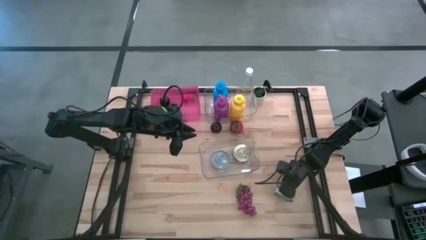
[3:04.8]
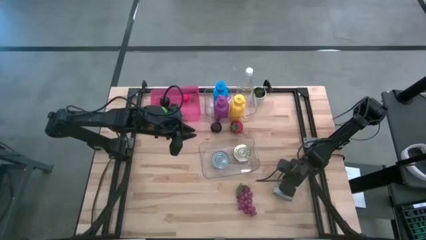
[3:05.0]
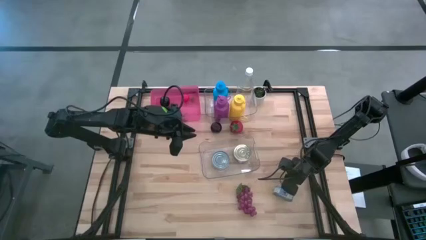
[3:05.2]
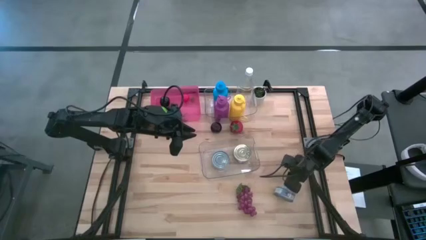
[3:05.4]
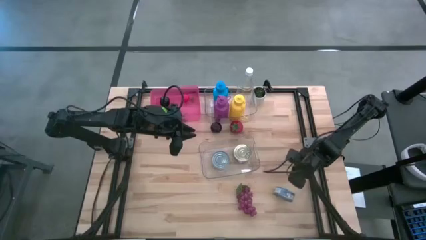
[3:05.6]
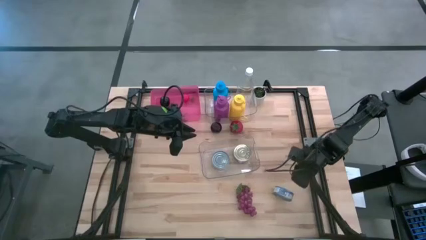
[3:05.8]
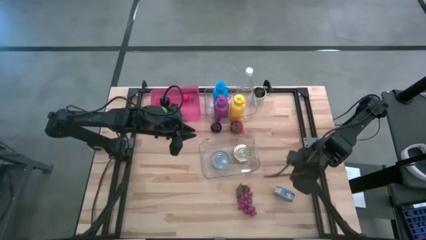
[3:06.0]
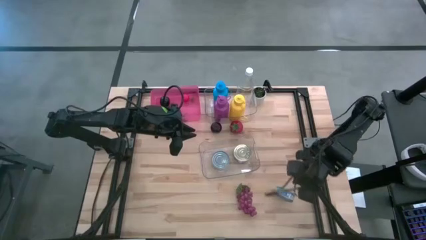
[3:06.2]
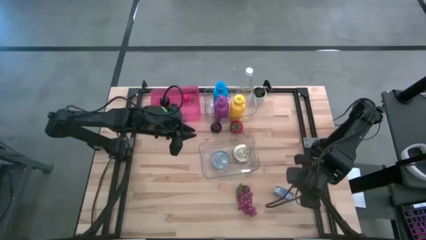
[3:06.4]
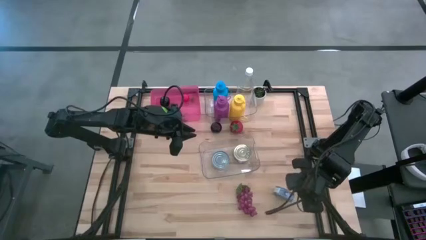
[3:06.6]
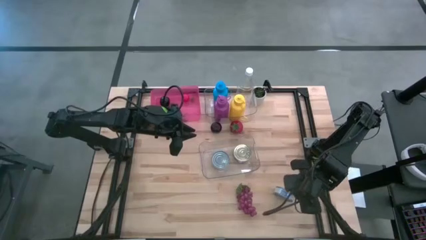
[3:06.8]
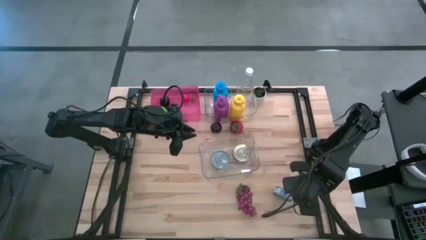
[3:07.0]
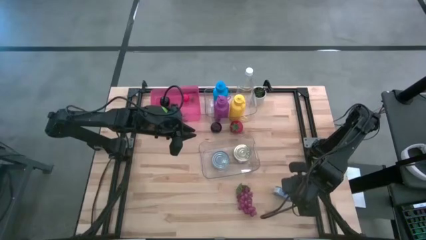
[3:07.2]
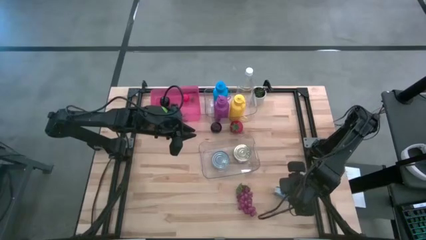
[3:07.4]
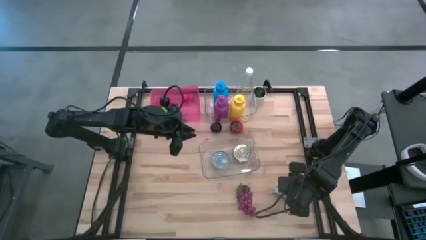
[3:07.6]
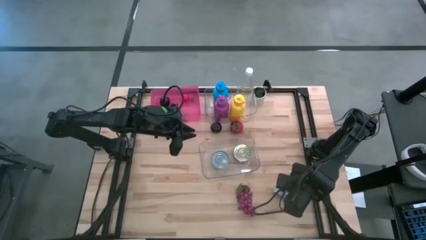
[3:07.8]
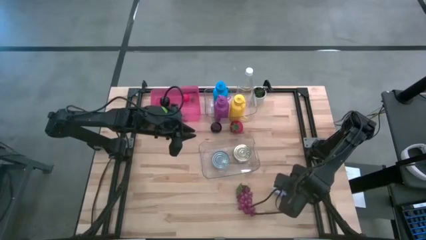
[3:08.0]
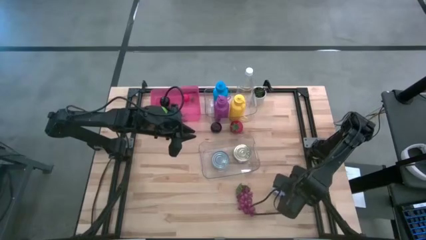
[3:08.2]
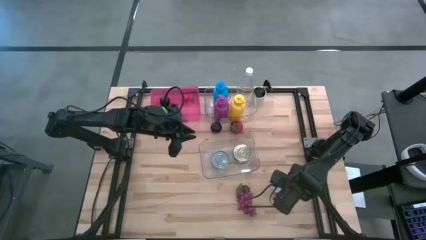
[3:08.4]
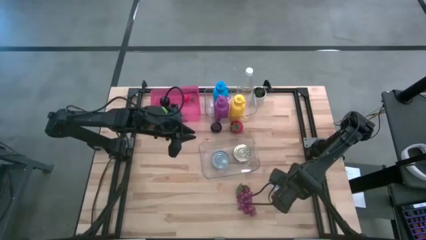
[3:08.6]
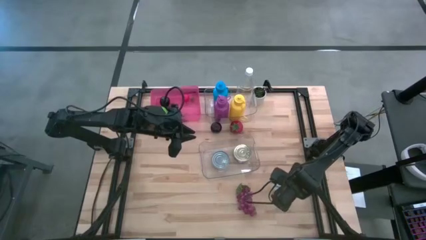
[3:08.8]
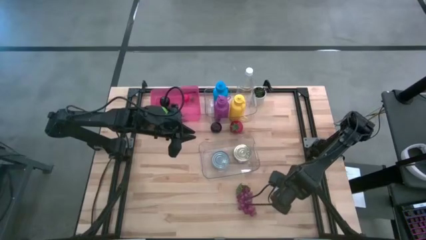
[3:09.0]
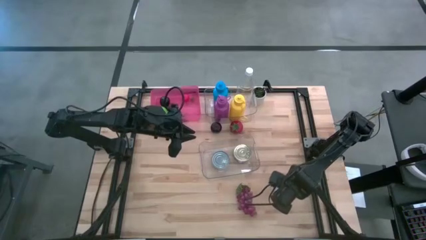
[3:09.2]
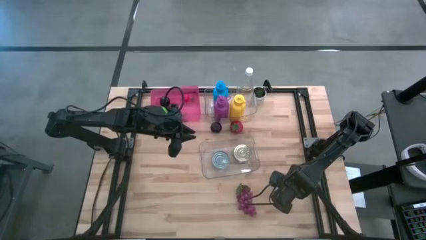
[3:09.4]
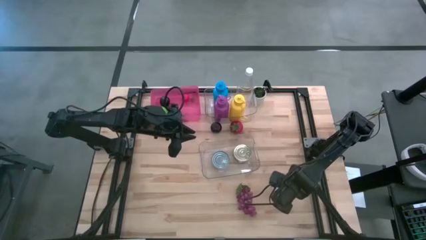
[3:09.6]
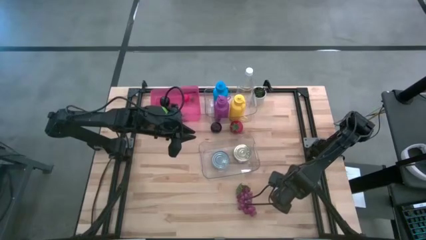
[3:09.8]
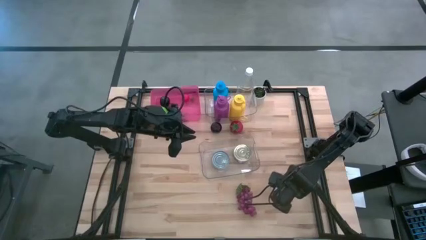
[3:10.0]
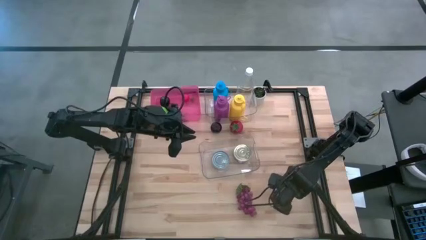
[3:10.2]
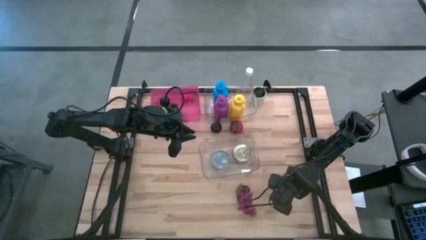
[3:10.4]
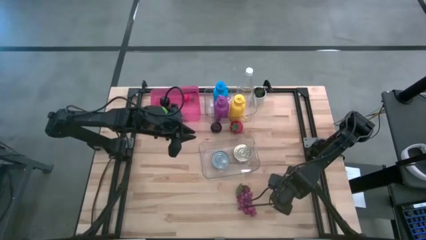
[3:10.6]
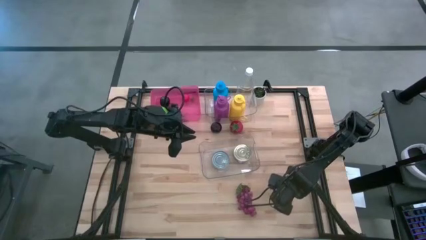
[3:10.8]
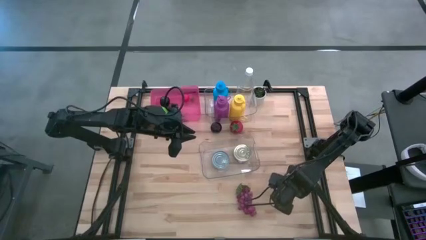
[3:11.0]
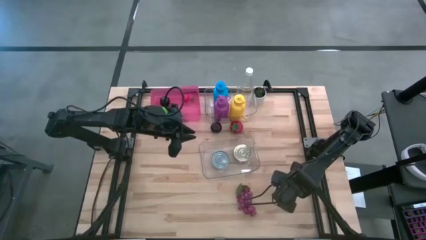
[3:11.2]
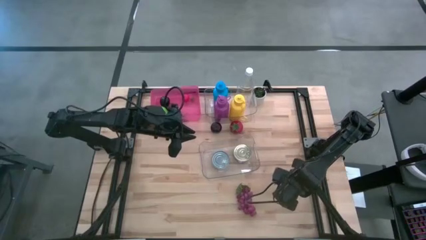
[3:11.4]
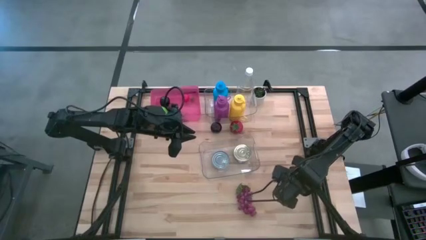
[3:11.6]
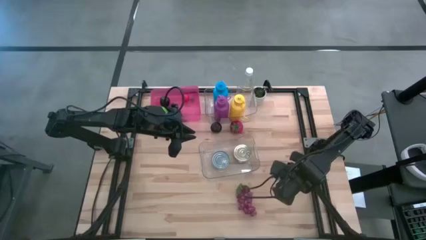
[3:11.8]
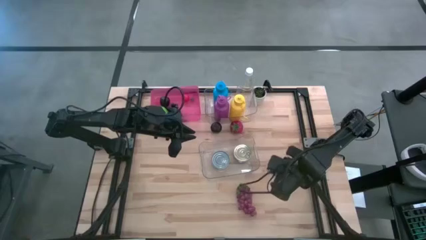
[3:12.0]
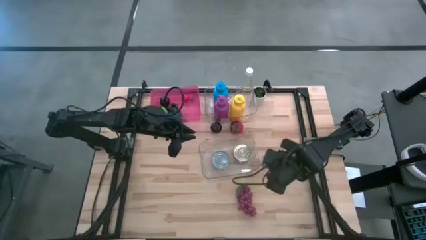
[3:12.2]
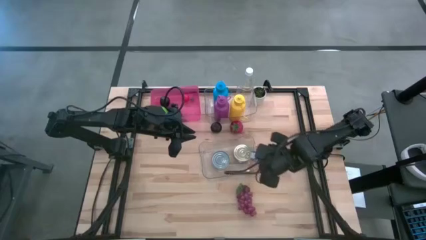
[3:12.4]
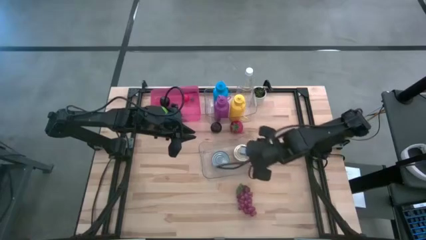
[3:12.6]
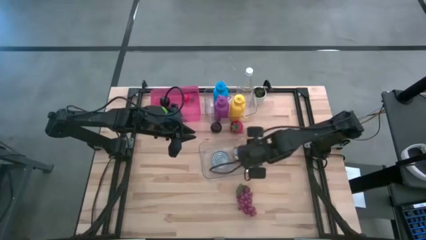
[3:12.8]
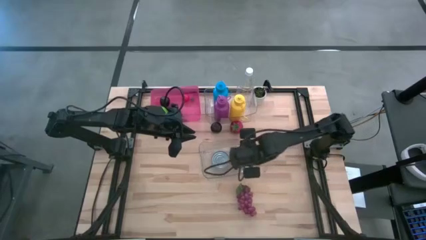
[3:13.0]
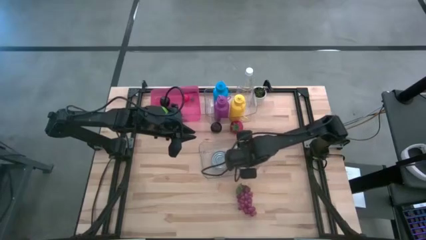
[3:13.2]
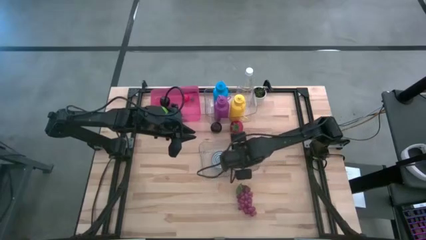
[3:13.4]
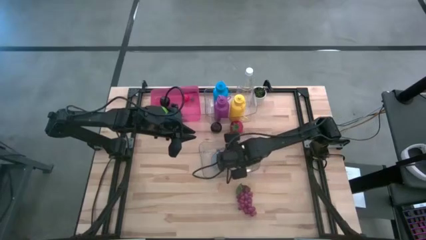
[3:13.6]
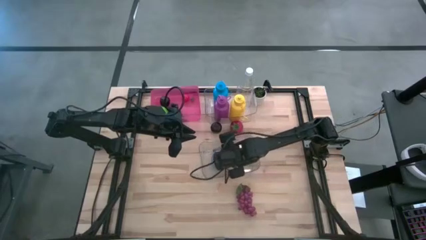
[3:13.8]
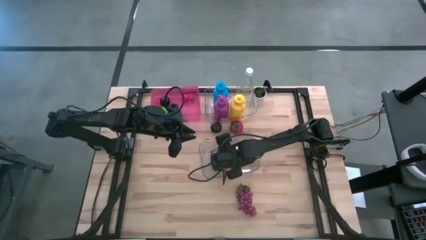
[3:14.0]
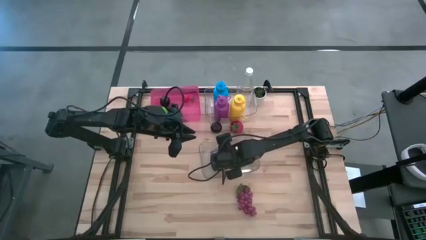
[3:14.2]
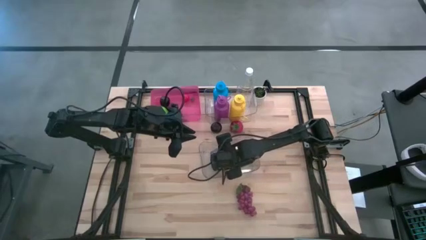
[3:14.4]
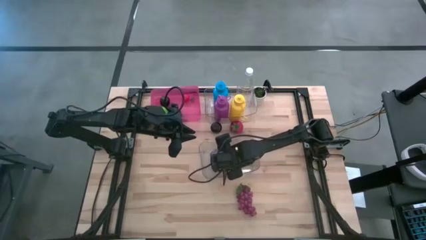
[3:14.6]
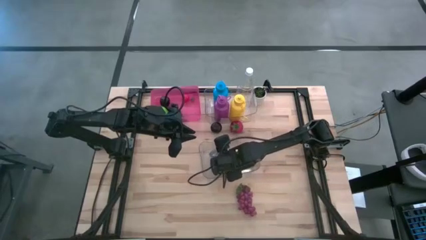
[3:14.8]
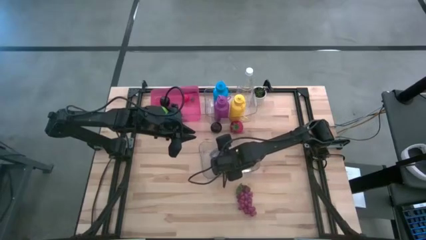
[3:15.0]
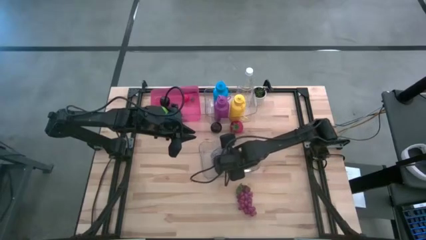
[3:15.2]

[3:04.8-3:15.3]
Task: Pick & Place Food Item
Put the blue tuna can into the bottom transparent bin

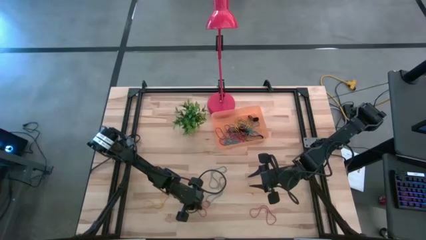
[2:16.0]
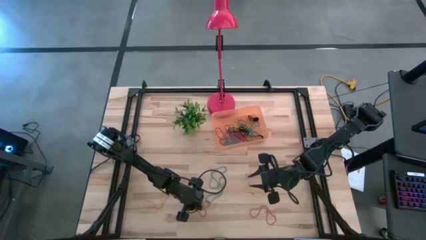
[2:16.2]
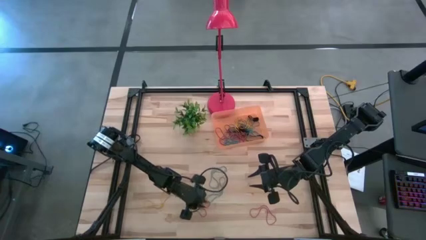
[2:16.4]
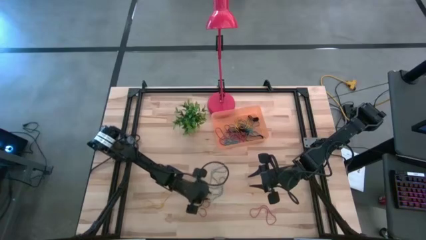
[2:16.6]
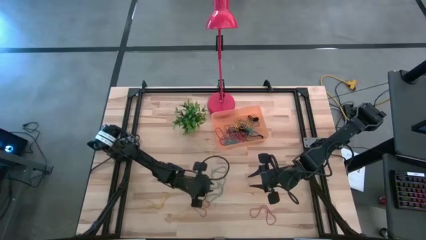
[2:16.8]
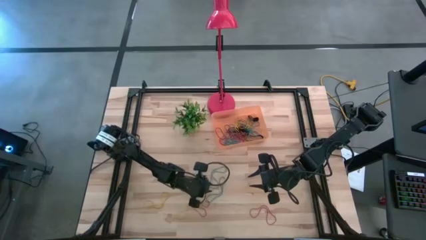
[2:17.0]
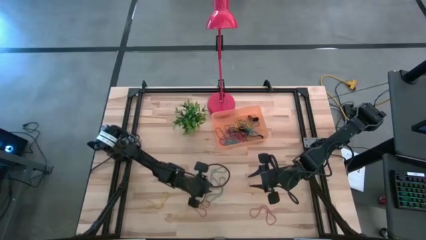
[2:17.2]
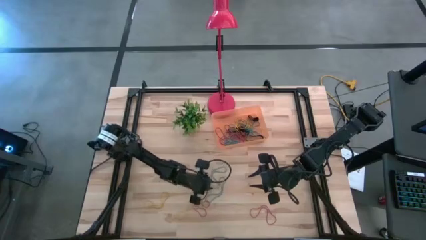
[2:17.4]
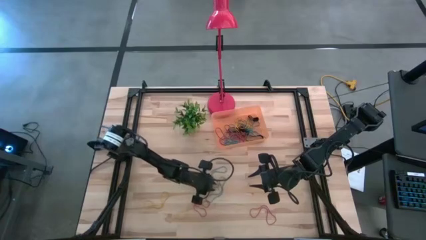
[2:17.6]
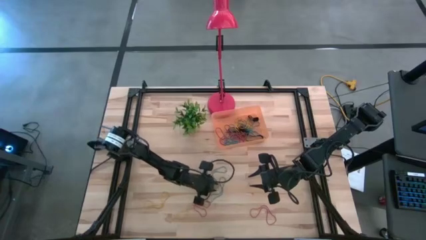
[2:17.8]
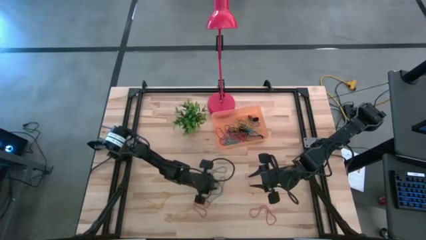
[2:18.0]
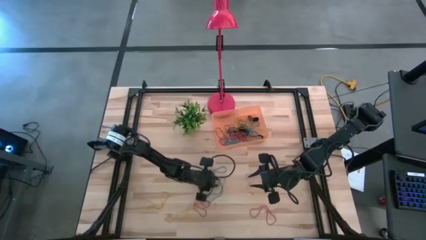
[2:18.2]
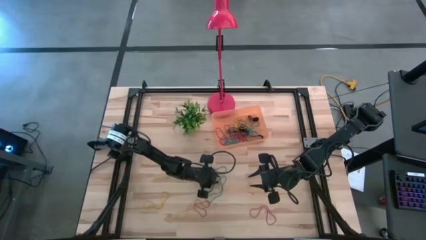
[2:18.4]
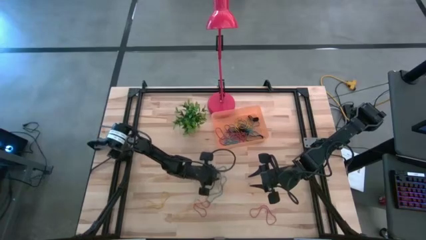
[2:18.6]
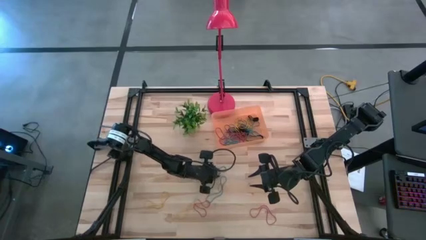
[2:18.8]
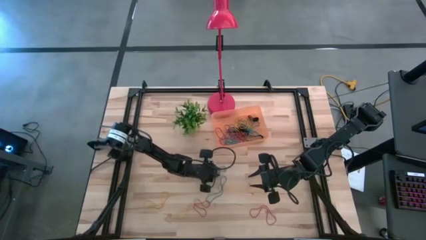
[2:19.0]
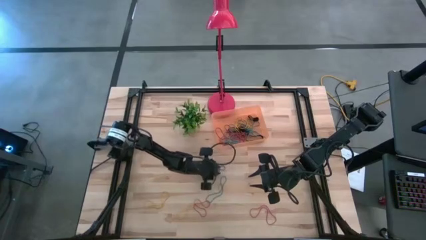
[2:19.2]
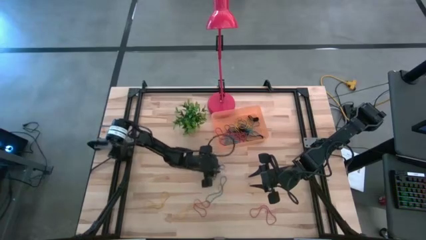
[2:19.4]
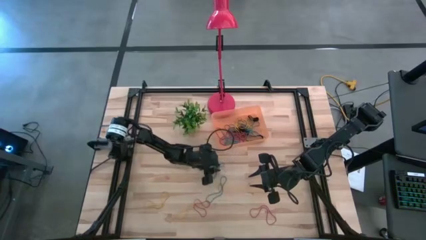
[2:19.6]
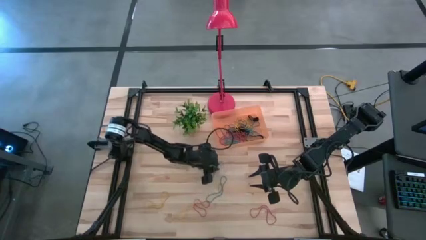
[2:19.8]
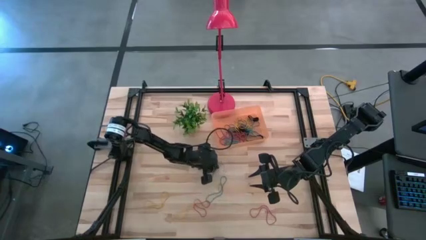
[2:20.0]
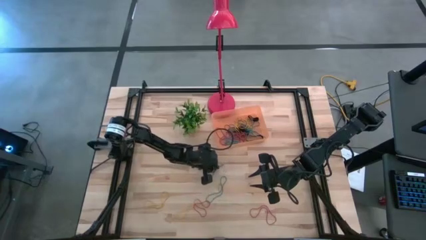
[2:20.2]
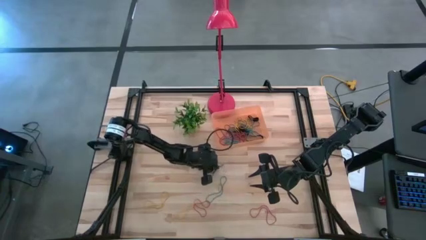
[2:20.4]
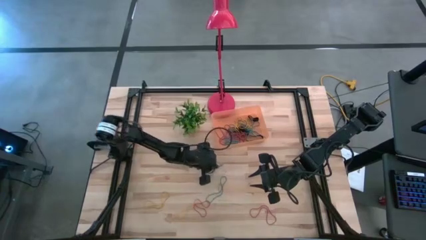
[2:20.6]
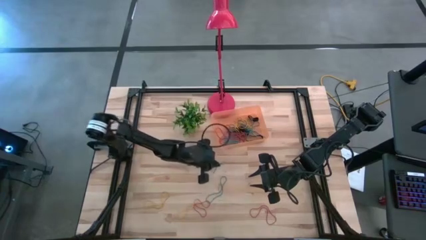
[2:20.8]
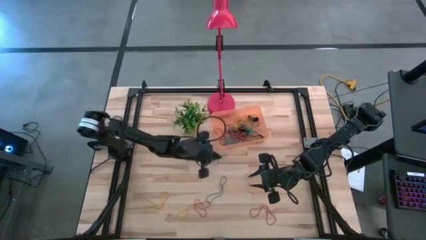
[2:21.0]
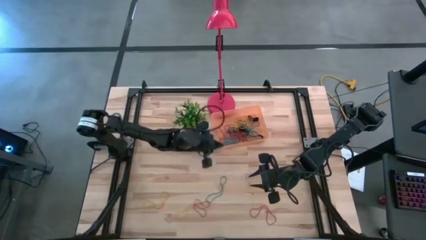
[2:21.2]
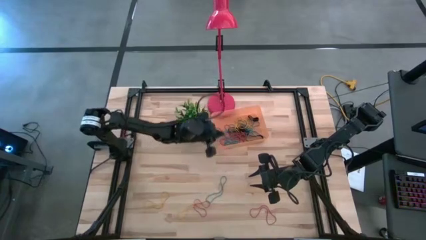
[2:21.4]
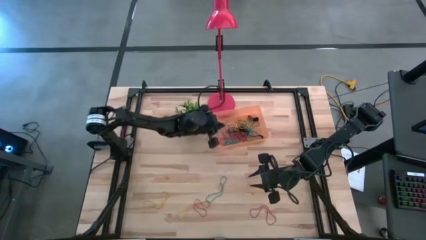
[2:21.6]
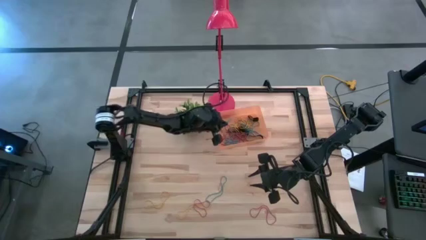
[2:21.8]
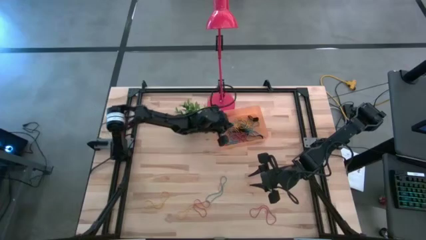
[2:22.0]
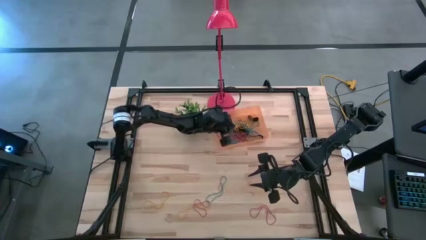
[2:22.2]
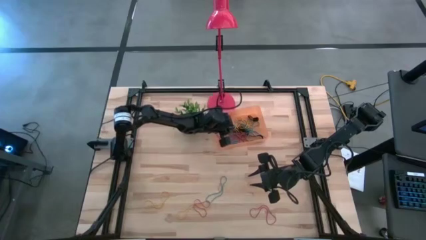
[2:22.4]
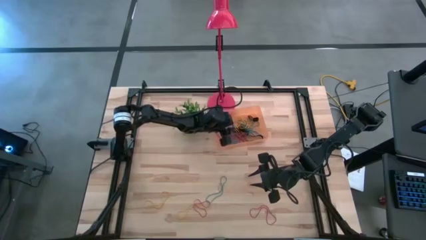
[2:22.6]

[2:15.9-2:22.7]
Task: Pick and place rubber bands into bin
Put the blue rubberband into the orange container
